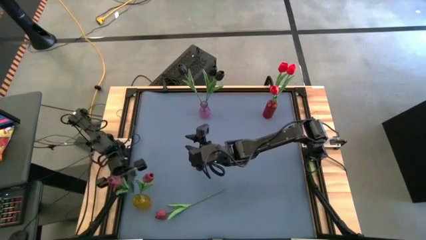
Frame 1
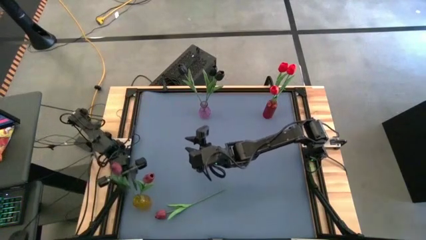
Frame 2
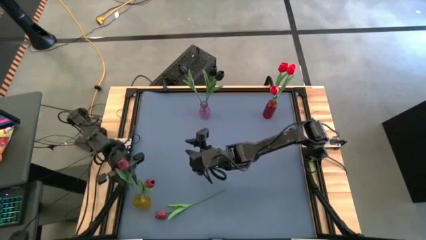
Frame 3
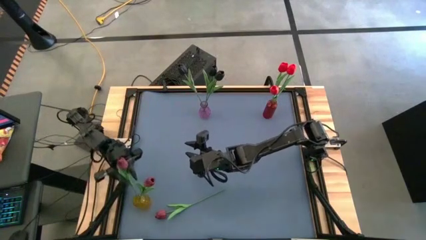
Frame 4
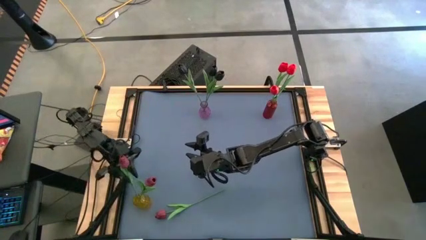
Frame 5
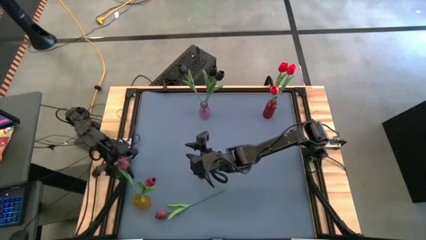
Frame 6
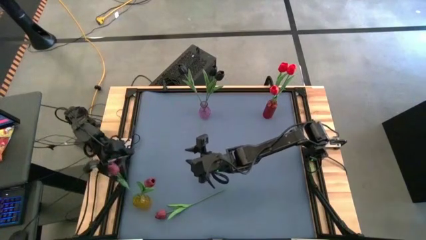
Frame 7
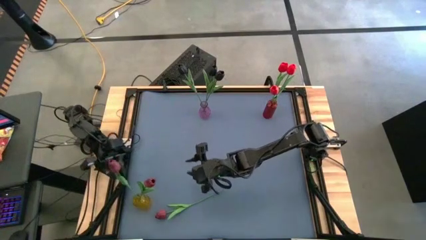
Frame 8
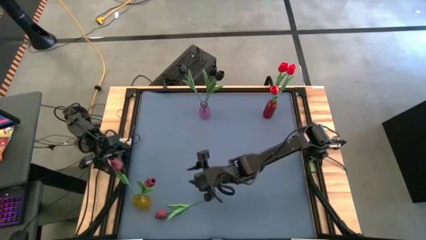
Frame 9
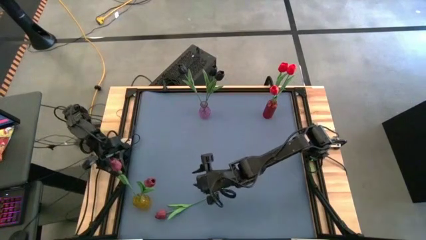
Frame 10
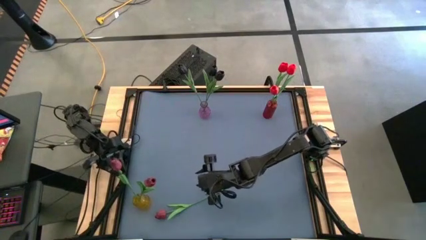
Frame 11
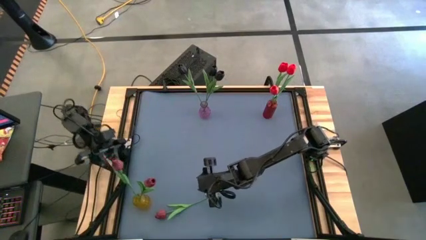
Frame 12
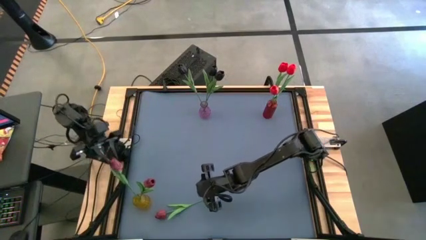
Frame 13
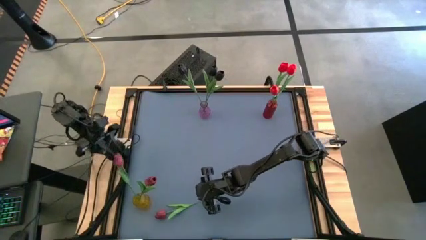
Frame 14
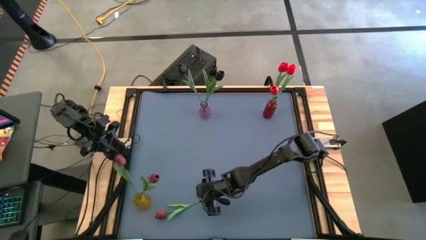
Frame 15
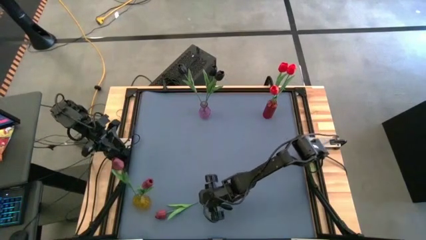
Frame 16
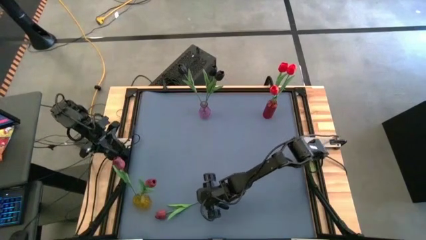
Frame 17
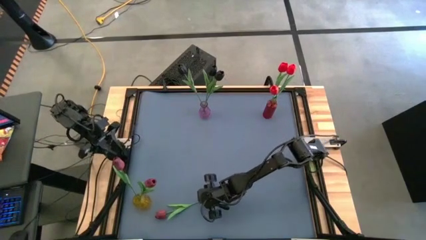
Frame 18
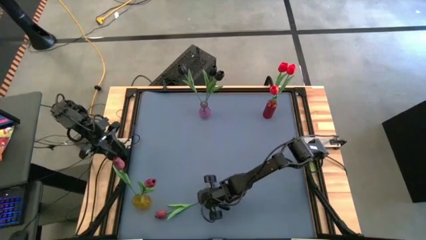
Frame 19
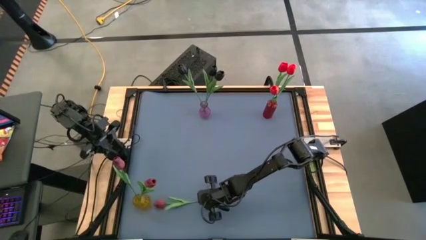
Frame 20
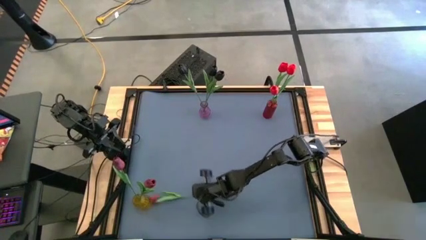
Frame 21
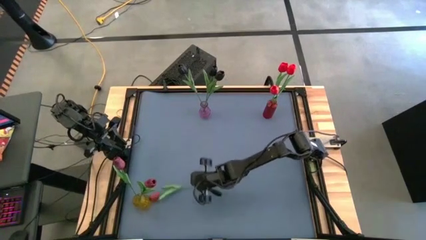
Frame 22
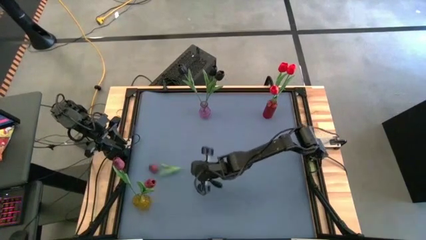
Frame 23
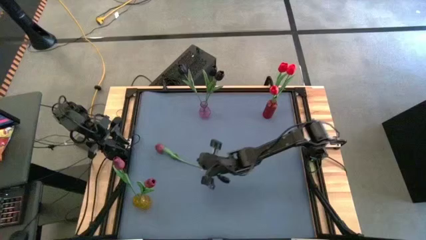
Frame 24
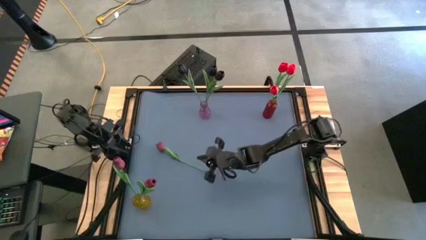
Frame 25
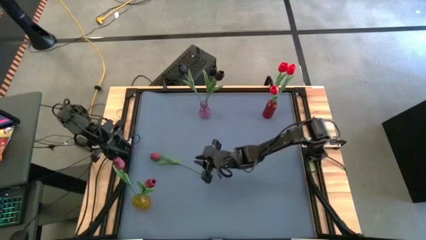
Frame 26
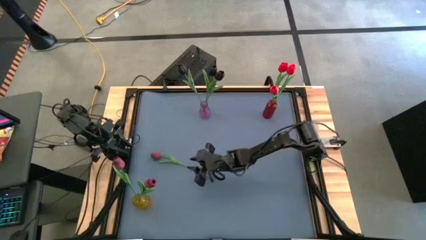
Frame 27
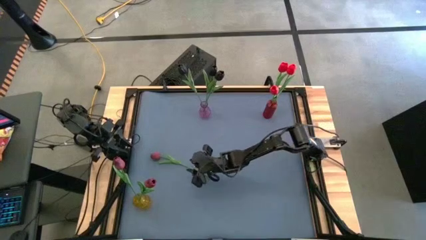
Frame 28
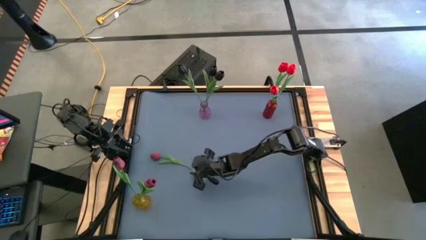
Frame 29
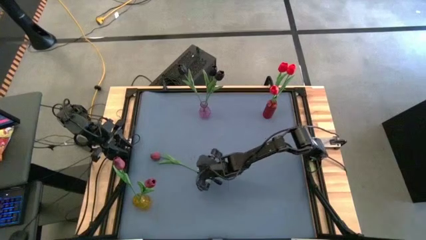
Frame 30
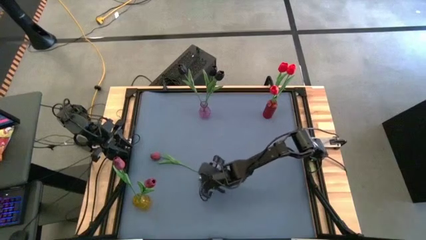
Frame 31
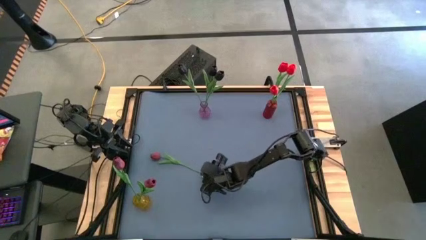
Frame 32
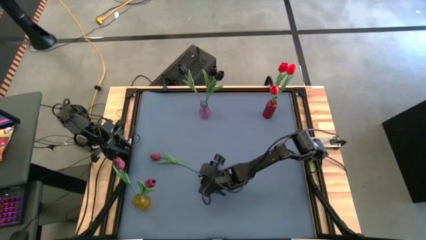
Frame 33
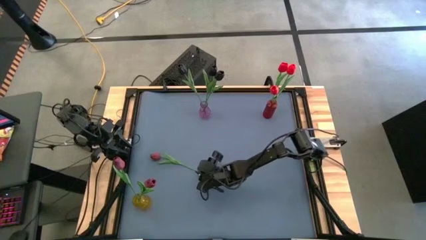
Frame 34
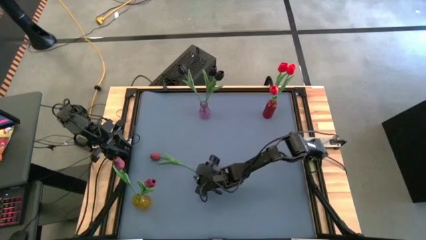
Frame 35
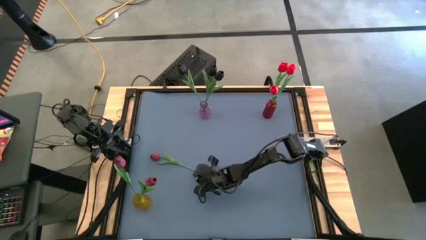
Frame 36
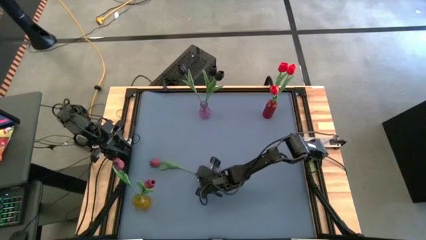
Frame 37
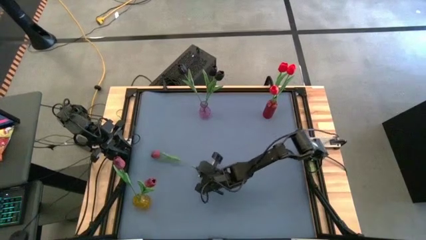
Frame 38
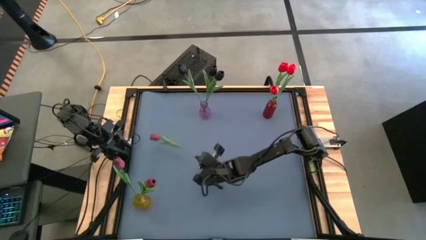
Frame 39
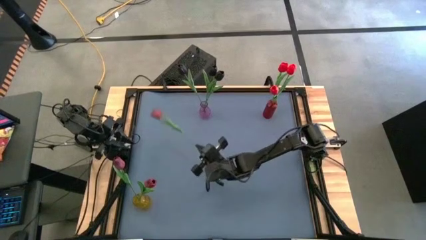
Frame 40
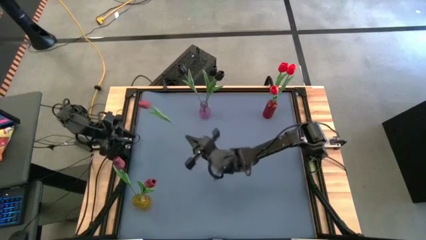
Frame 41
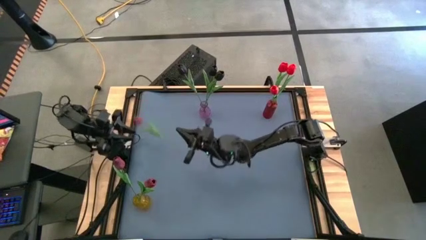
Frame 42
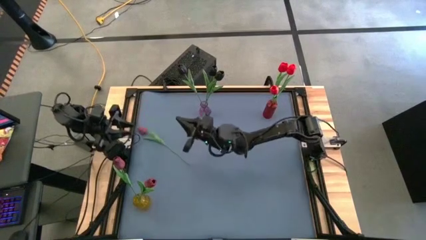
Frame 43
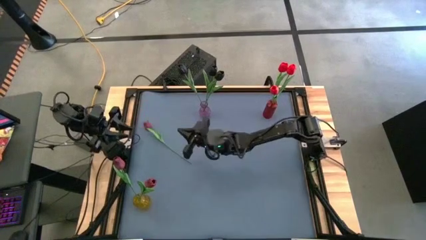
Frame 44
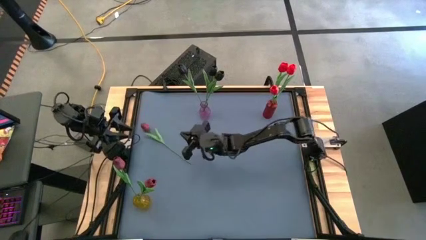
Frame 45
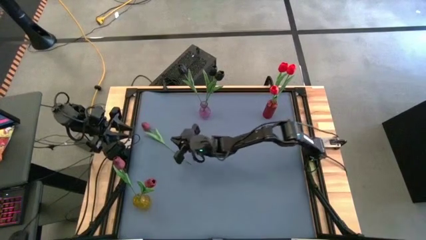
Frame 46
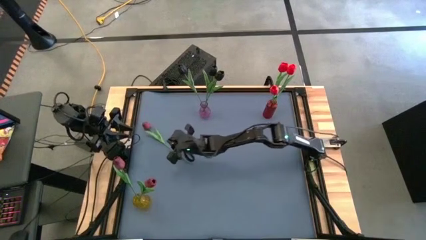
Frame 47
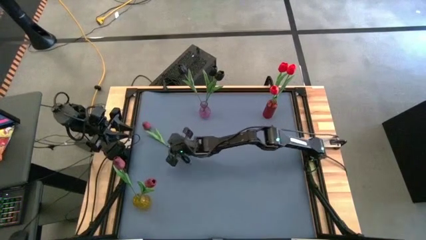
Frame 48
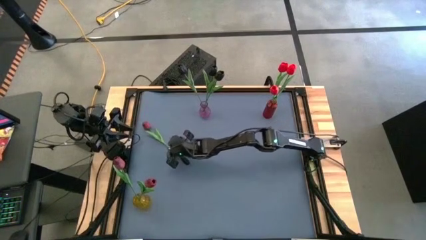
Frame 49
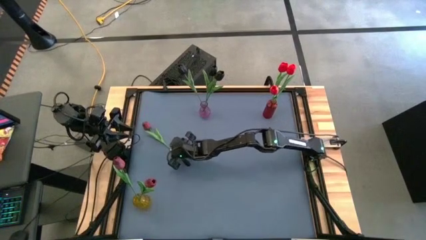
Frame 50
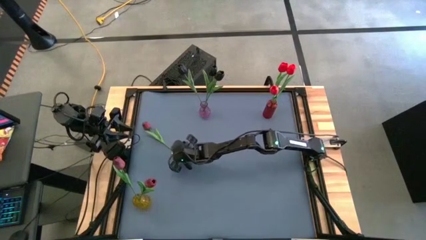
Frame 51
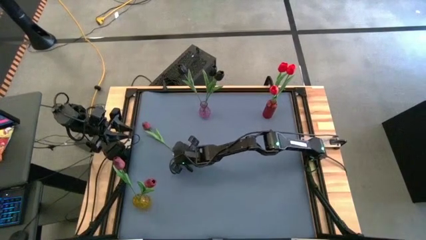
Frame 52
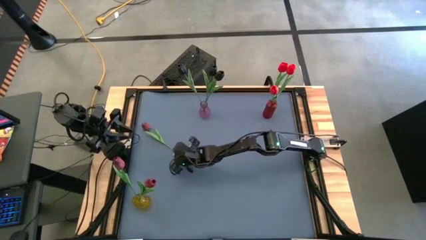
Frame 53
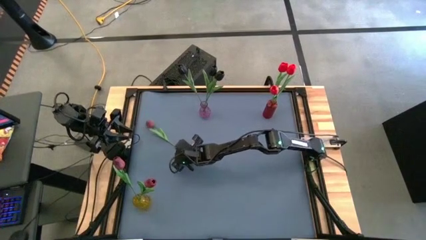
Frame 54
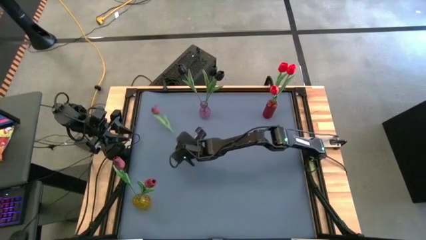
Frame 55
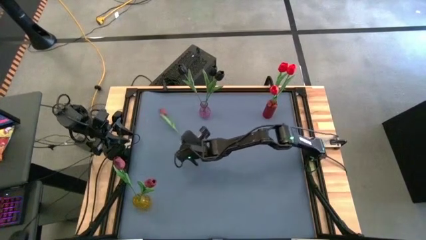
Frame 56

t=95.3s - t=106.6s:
Task: Sort flowers into vase by color
Put the dark red flower into the yellow vase
